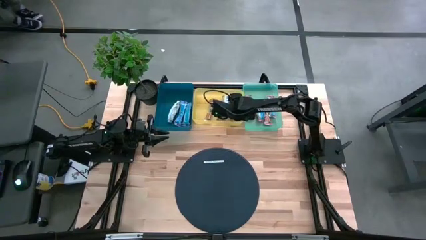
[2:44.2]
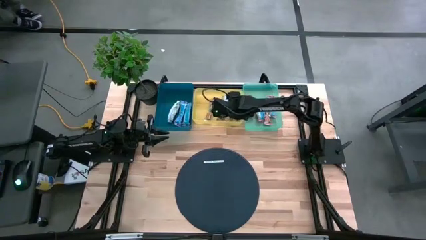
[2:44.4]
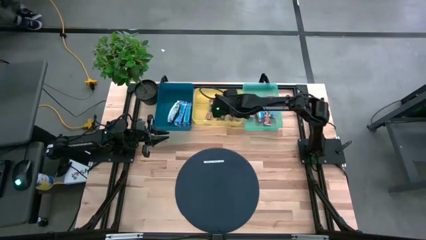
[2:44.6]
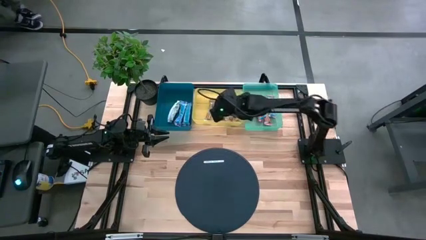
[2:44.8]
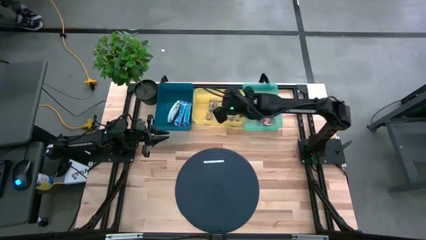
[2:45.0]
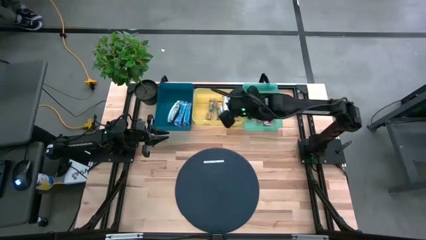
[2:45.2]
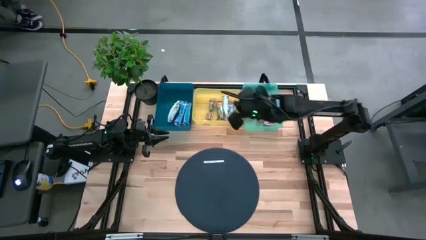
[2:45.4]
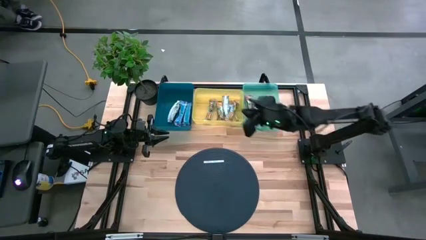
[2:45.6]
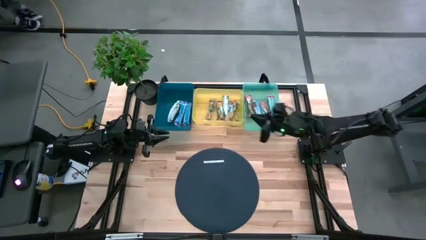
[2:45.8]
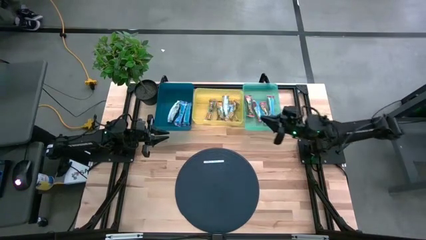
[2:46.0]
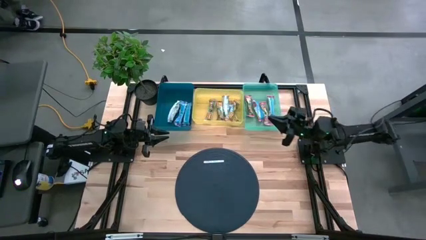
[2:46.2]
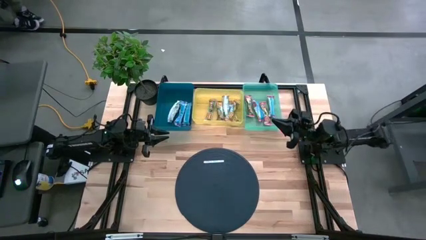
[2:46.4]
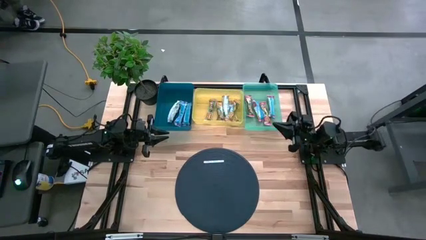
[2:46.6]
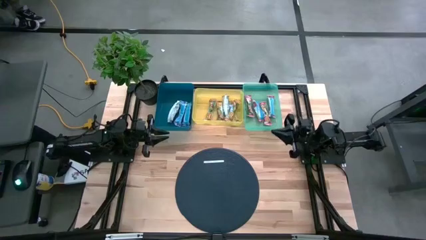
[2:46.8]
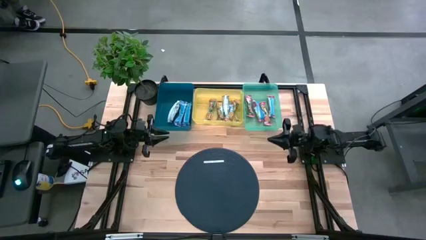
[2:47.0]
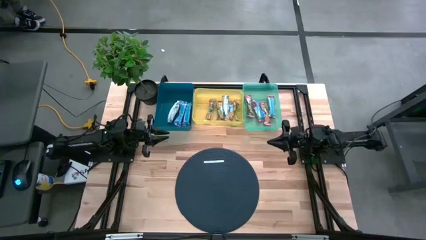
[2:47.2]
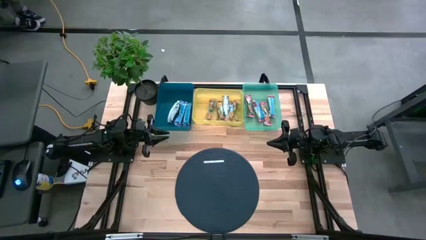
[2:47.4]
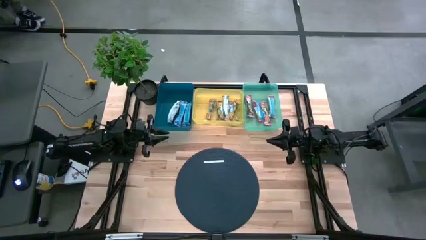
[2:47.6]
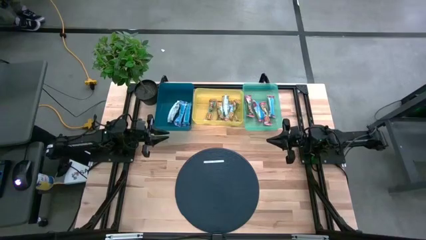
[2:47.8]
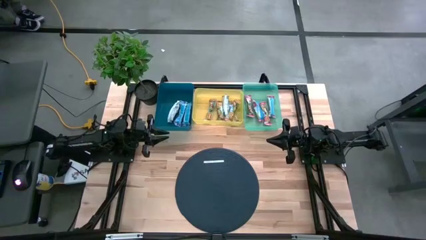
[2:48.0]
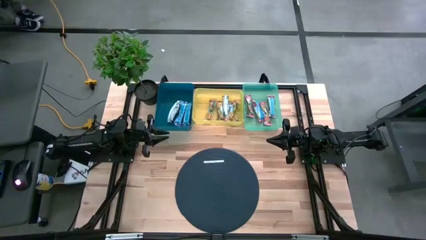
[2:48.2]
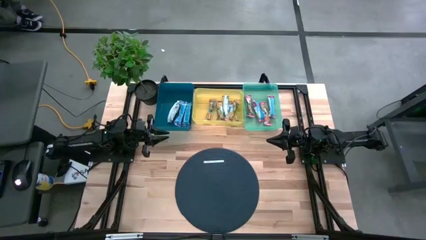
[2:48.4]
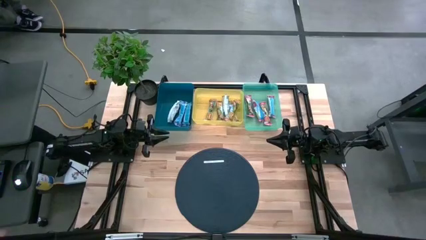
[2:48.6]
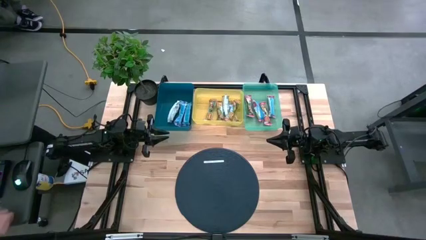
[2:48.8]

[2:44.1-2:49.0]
Task: Pick and place Granola Bars by type
Return to Home Position

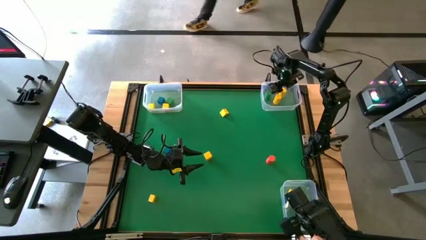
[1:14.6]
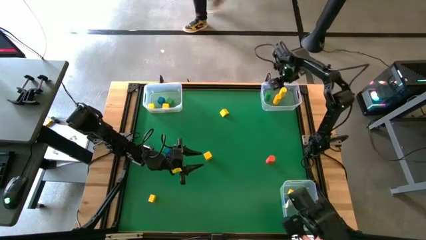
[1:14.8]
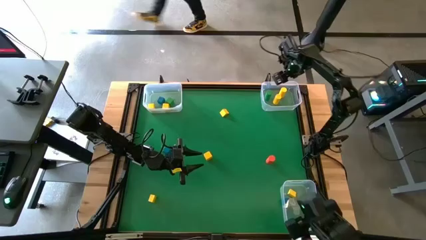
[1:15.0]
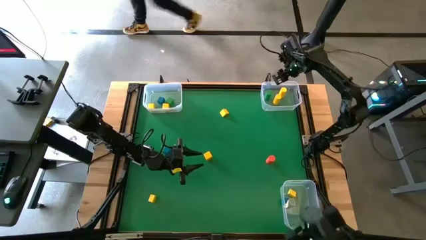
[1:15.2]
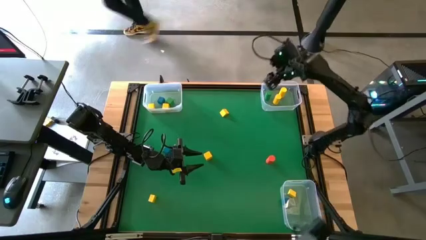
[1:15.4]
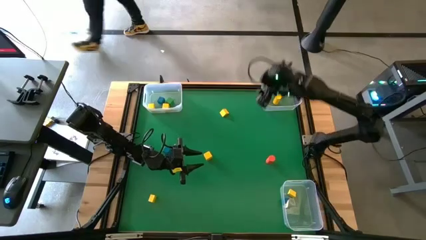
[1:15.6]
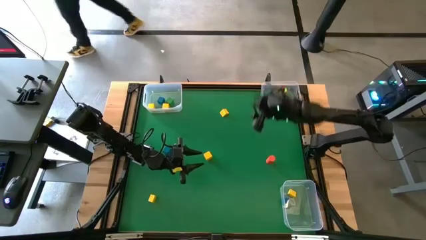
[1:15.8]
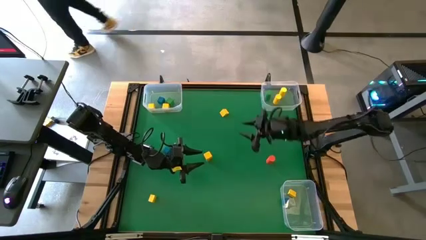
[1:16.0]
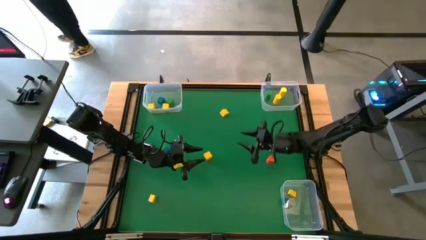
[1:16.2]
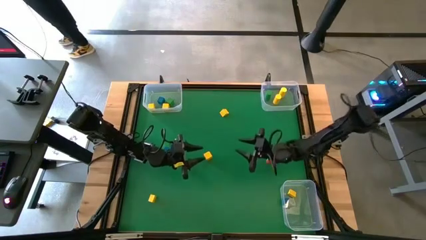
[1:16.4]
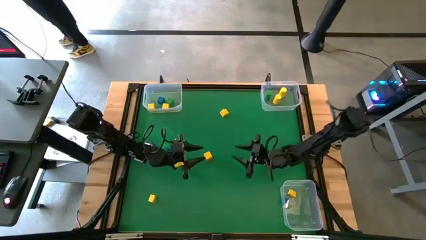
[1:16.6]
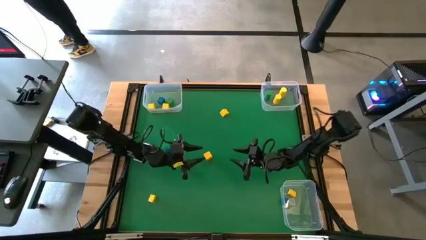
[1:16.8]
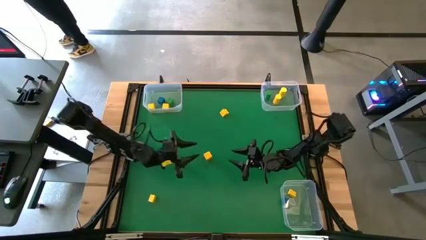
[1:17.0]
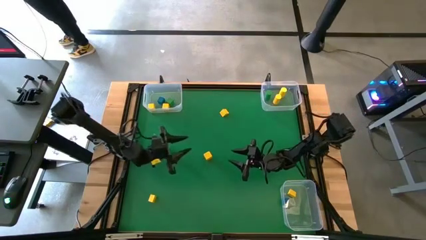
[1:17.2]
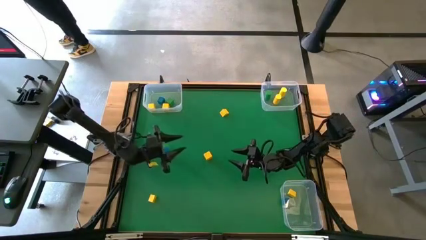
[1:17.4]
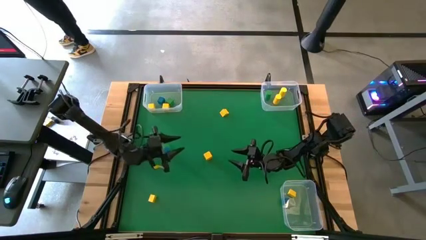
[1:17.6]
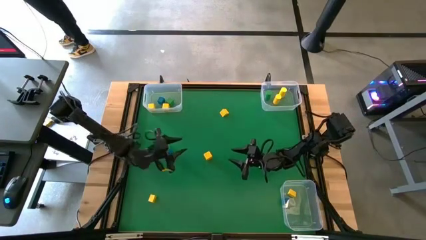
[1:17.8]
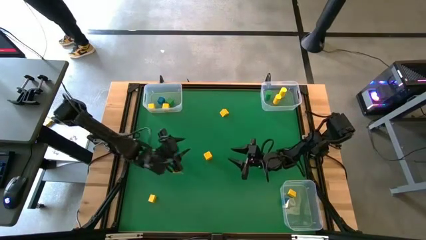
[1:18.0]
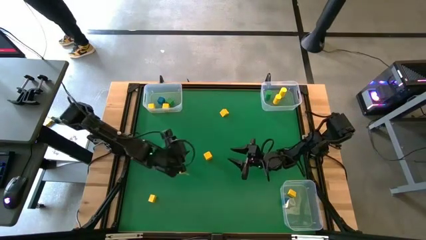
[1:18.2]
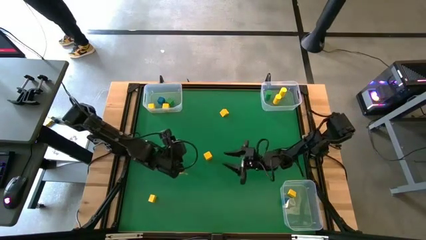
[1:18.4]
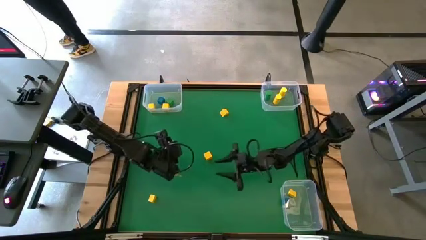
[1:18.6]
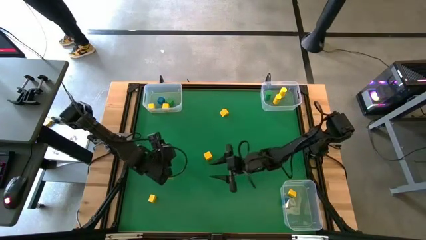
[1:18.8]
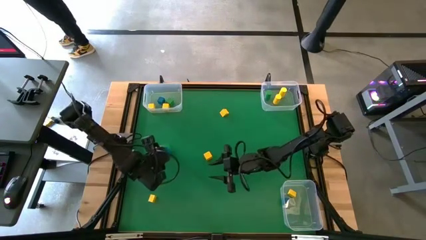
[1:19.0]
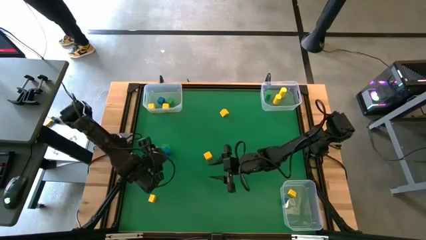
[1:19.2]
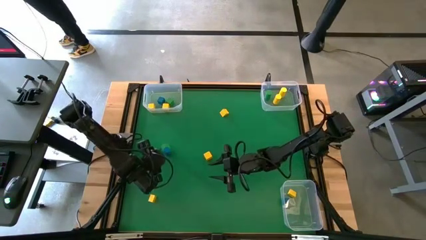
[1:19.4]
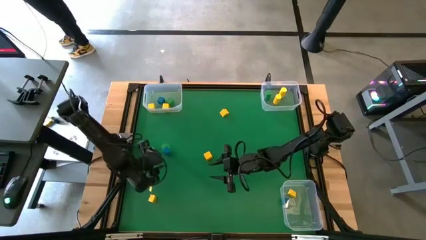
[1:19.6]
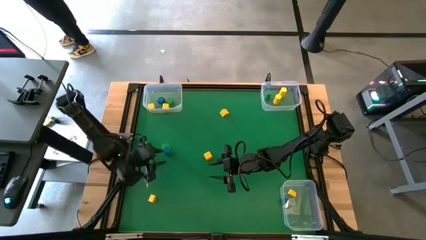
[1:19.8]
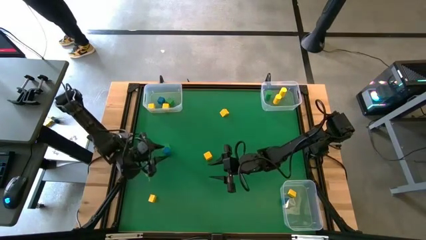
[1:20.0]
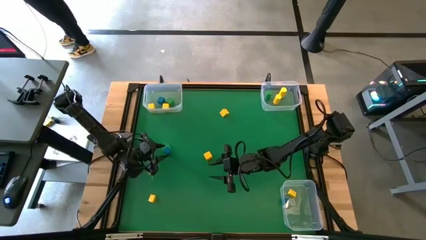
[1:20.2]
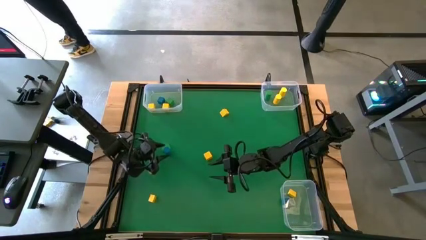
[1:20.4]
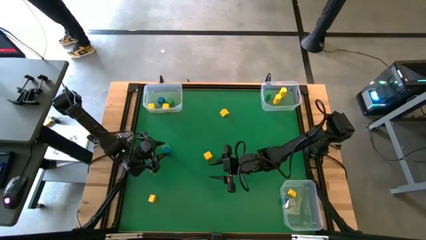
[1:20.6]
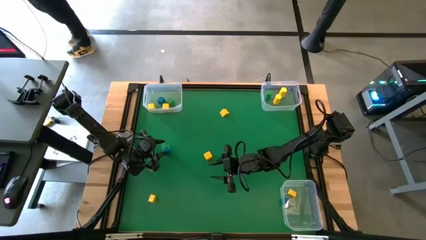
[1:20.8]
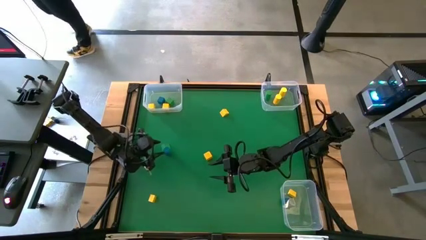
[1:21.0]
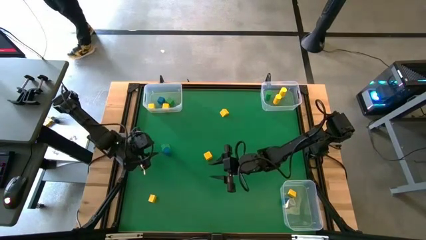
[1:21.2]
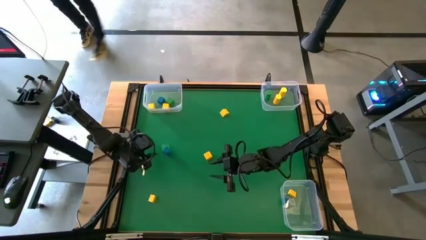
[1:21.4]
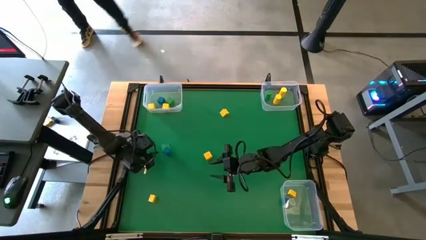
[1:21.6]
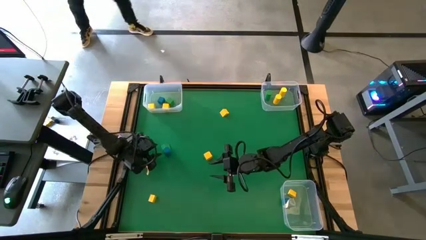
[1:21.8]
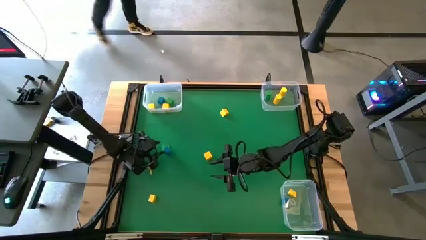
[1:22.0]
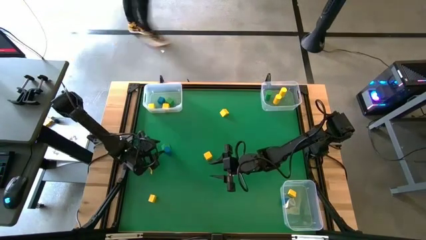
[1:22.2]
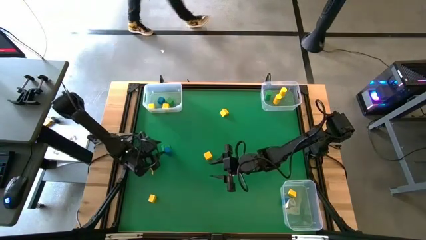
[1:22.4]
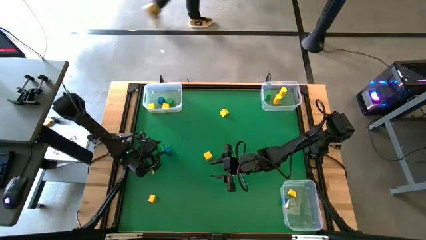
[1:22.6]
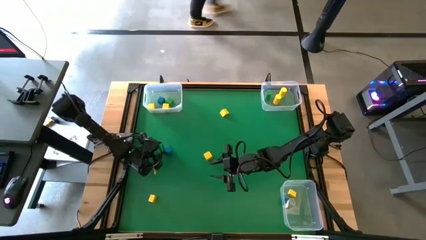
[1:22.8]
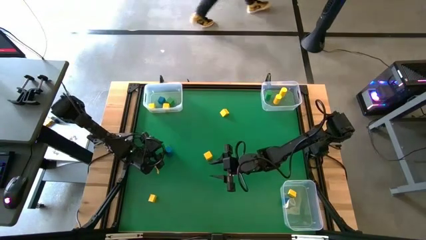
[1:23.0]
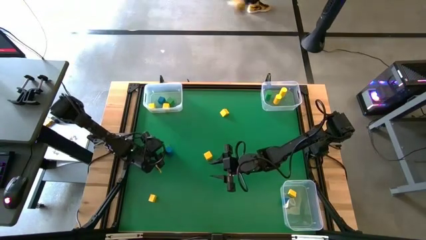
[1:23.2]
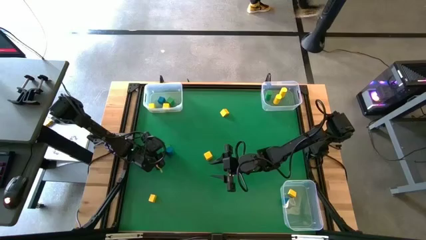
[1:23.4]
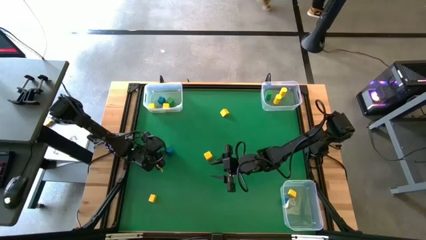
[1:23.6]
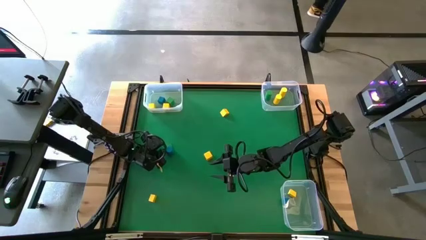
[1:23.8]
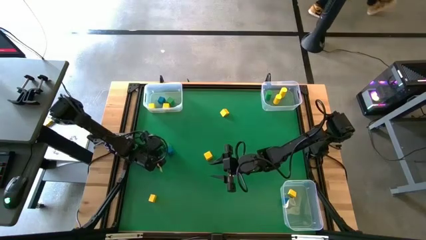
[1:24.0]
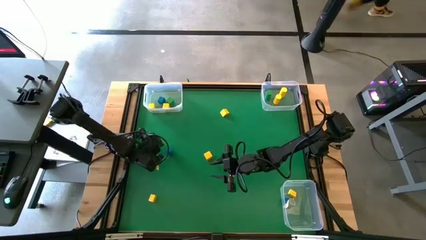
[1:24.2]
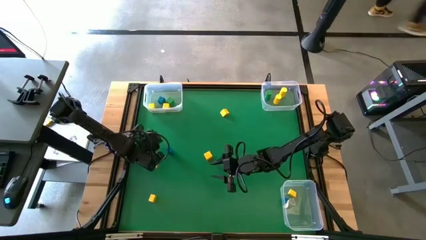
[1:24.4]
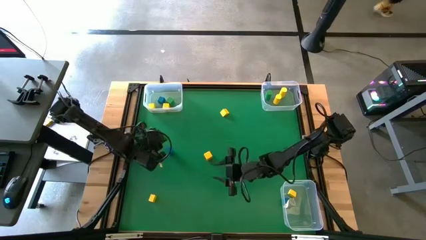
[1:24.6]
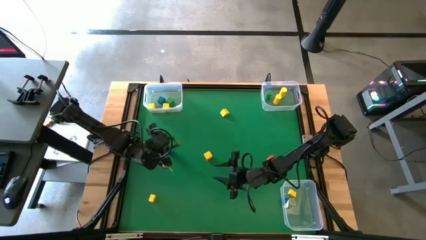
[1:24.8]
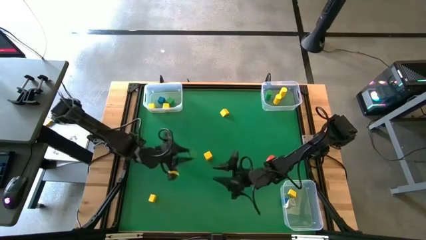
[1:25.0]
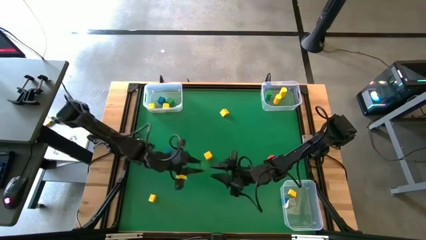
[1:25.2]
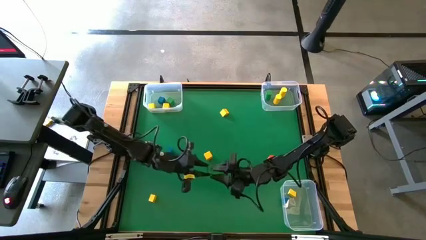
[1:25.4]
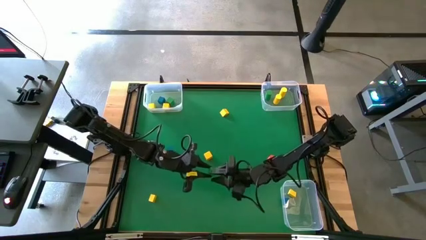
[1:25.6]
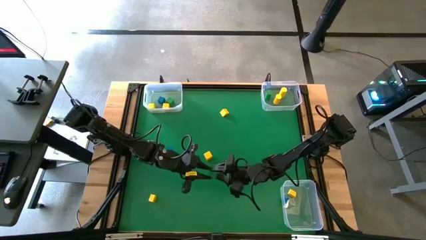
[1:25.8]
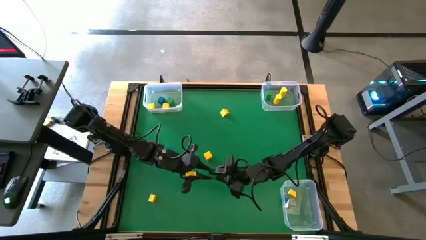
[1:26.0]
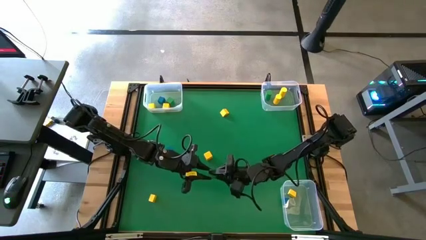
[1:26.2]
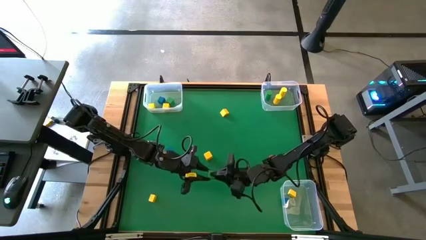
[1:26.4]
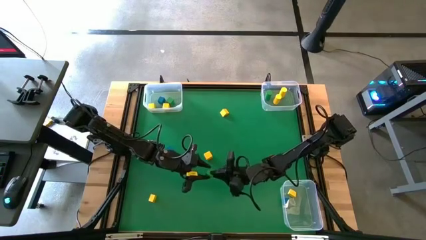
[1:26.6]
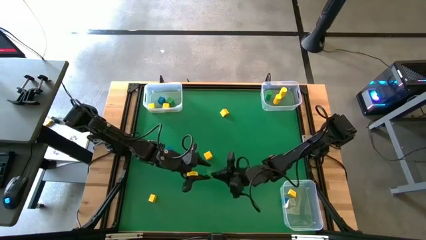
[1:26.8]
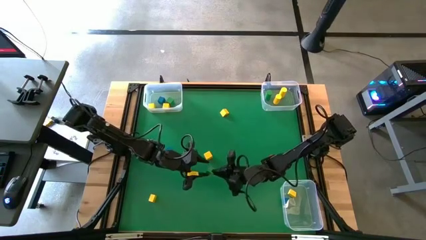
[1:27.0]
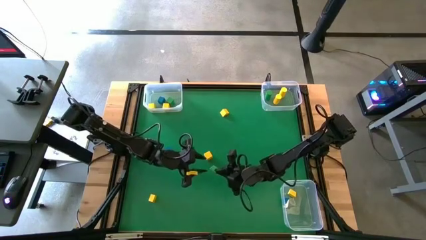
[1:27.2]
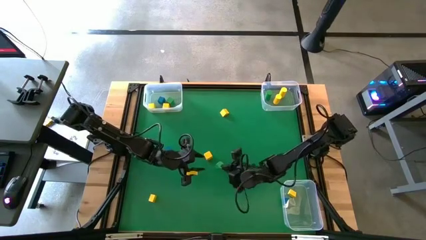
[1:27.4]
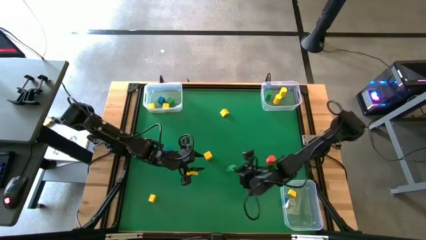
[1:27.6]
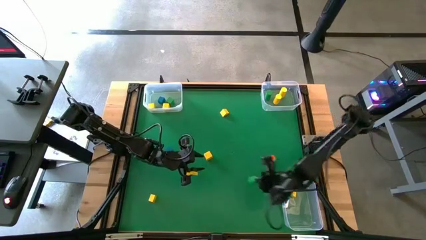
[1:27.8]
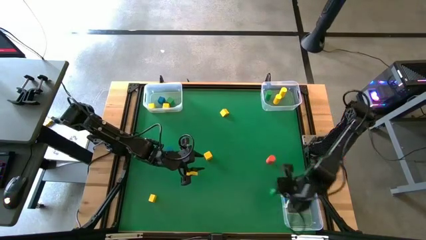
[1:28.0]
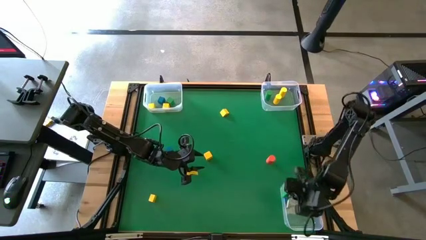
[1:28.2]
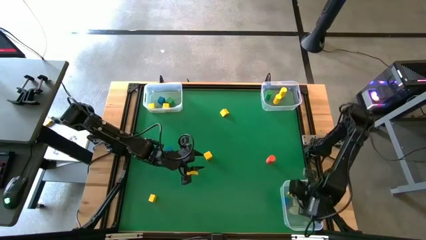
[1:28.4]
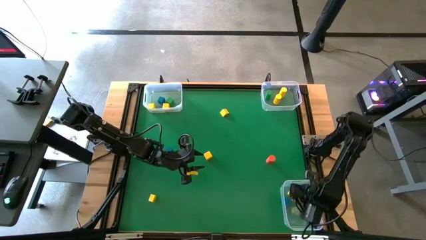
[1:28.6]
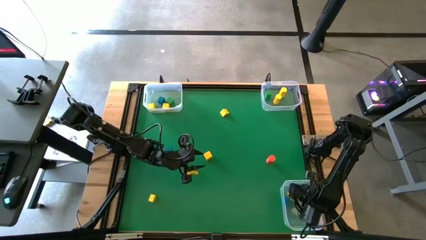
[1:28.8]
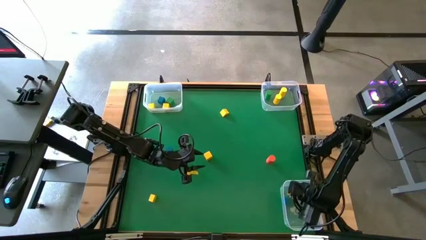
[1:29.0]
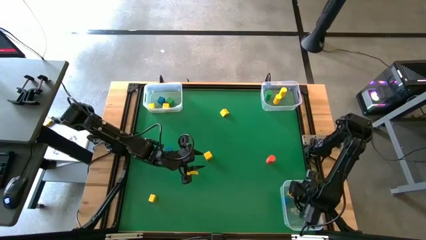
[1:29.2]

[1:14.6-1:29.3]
Task: Sort blocks by size
Put the green triangle block into the bottom transparent bin
